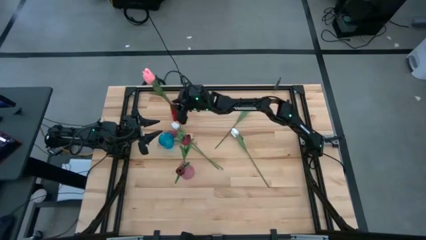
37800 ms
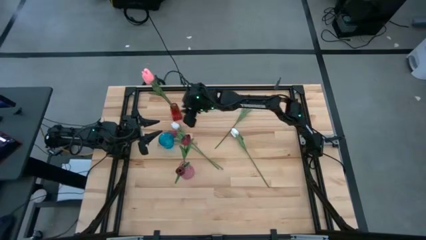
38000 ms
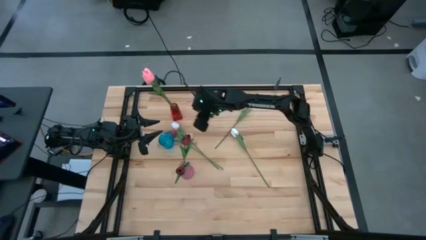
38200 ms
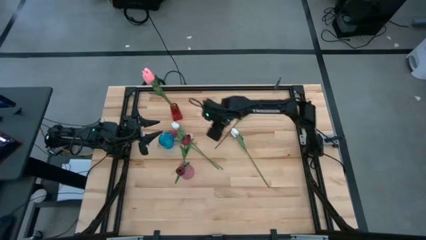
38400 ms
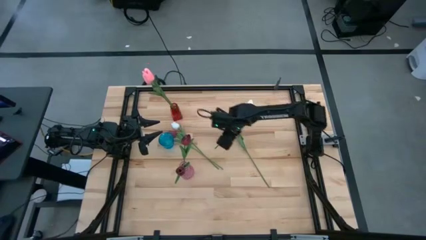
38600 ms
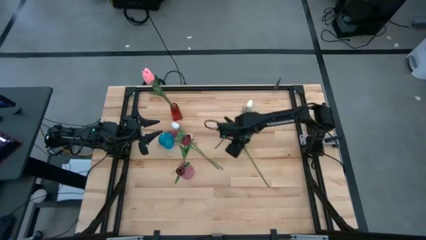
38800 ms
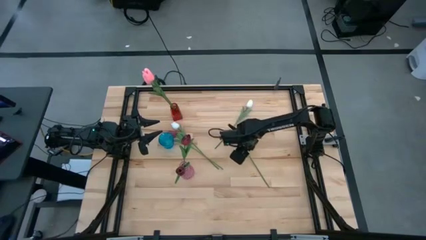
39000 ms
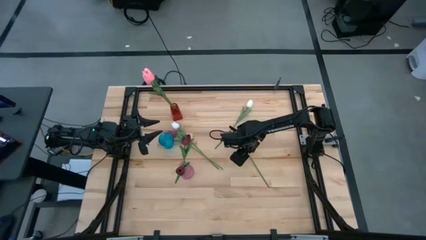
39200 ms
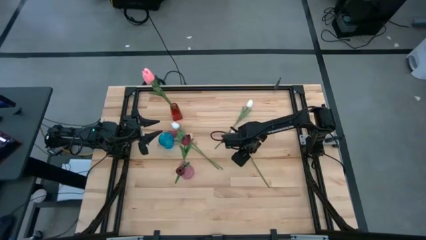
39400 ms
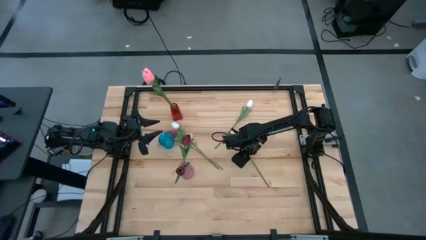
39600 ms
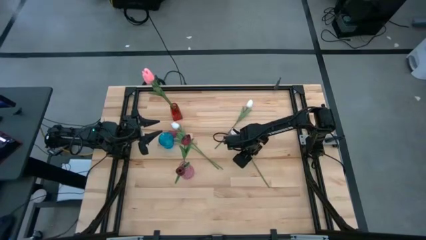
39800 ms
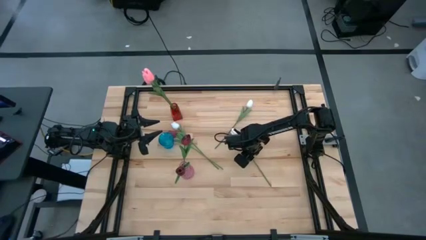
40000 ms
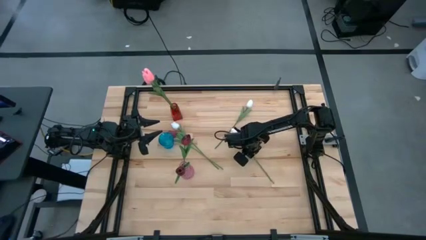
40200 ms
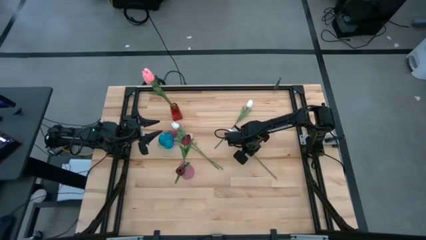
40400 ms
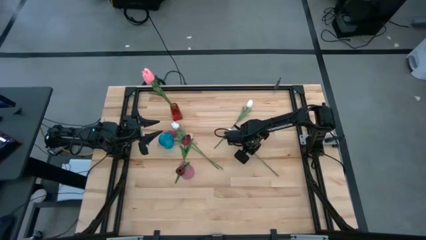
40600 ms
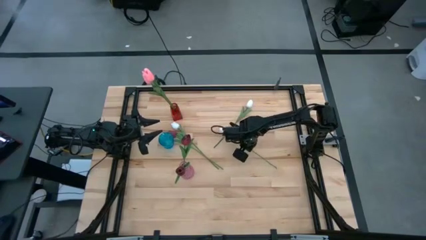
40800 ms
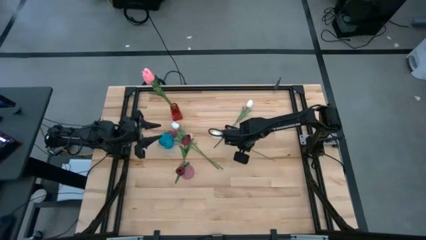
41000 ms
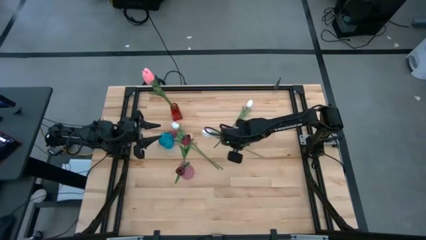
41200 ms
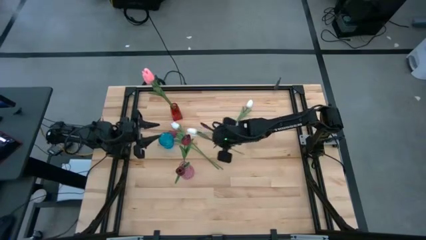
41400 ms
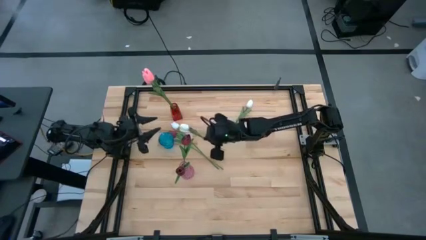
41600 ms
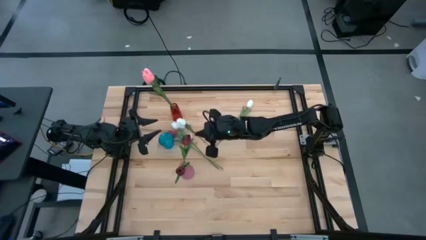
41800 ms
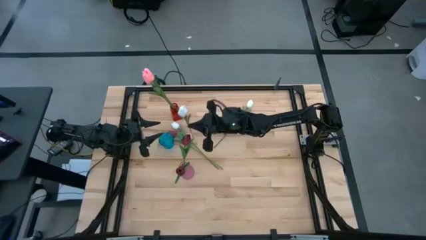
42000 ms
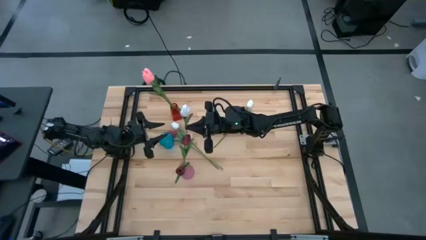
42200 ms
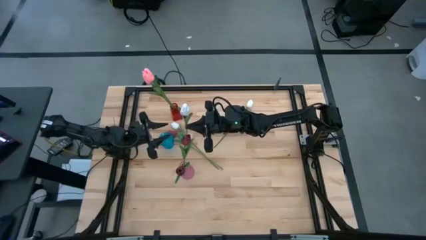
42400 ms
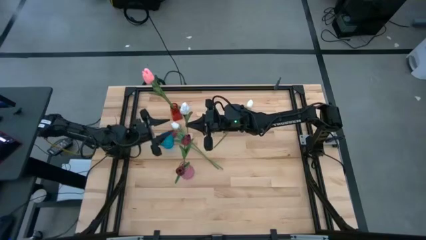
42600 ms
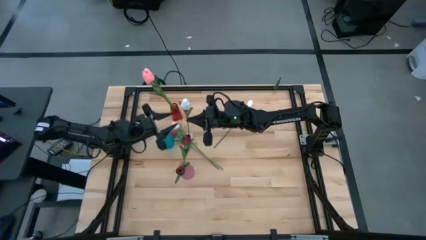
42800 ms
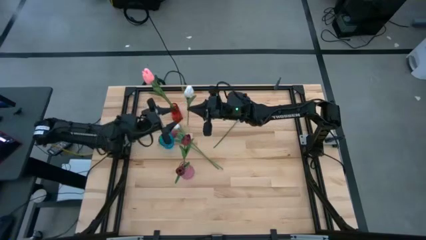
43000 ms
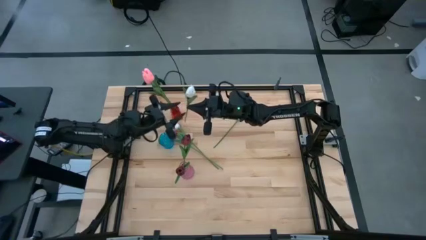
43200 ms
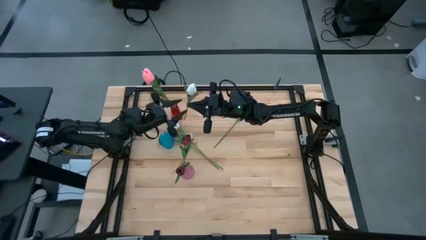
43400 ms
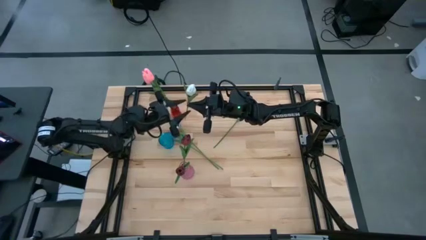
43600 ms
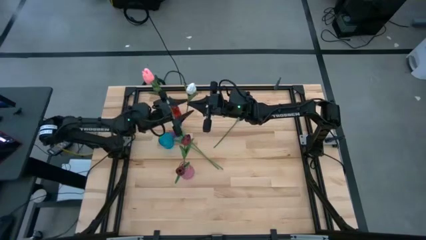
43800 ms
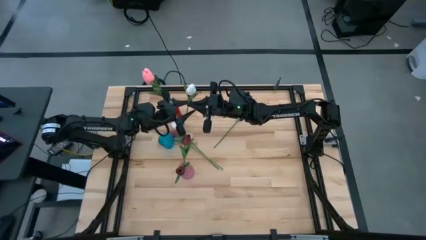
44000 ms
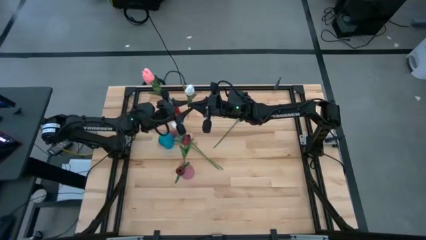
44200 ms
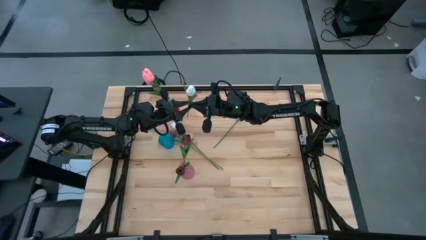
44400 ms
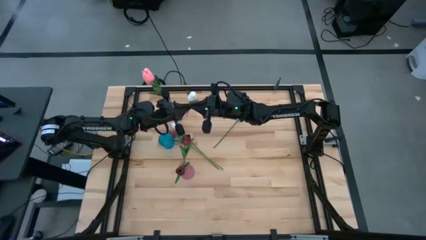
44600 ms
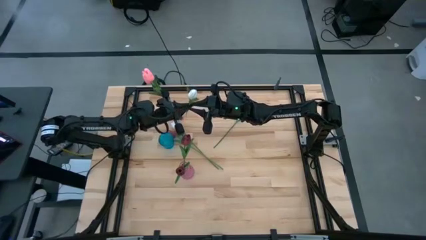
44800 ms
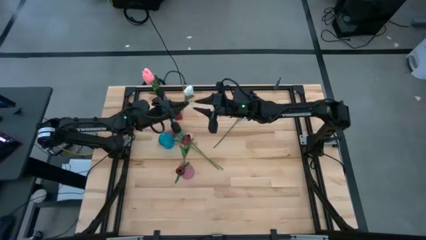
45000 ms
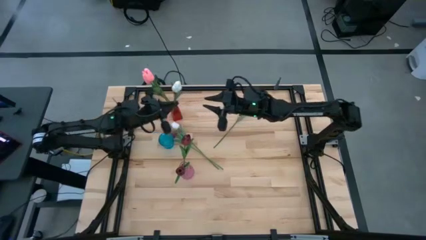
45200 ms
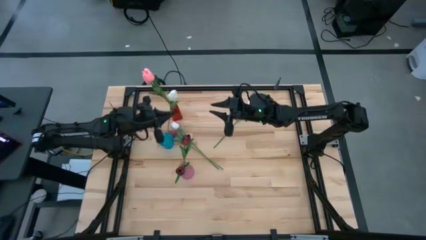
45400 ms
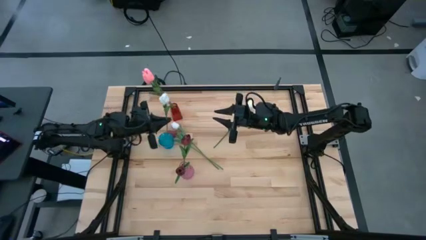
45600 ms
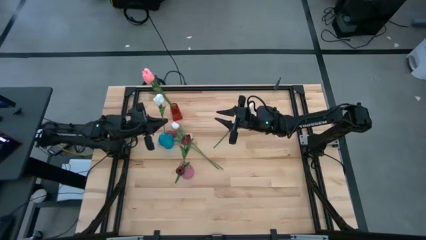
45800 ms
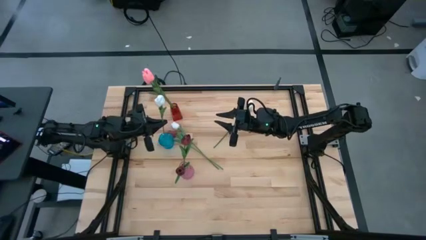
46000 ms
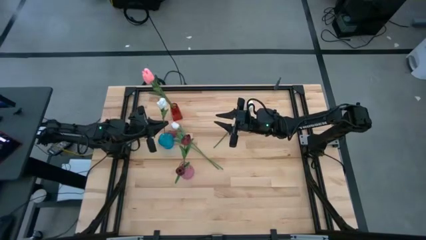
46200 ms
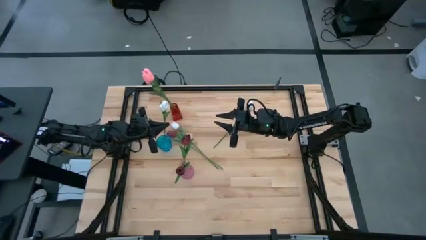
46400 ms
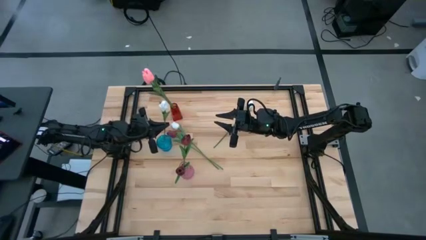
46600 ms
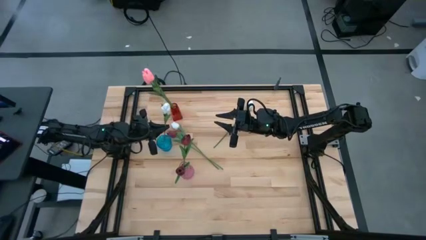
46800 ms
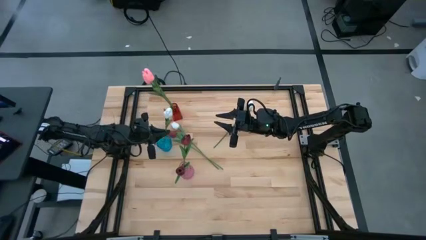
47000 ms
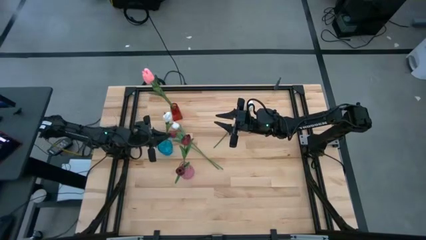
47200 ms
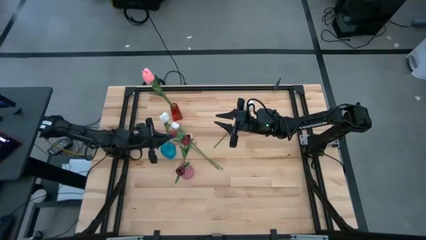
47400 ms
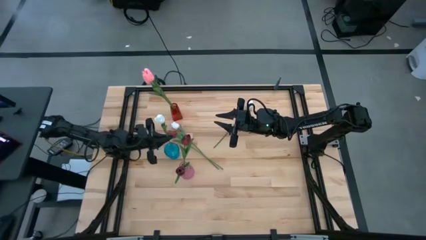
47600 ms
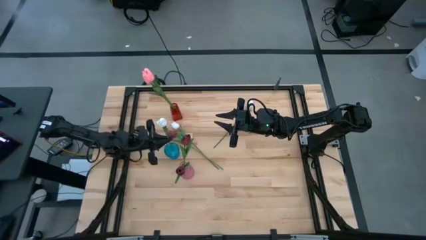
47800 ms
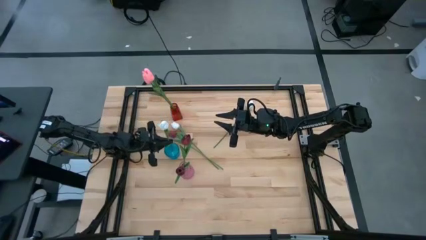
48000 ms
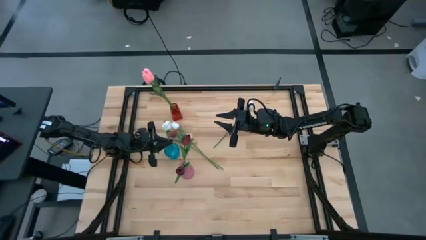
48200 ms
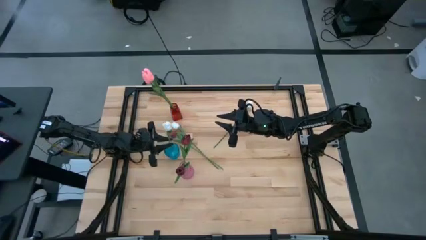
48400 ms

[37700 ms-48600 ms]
Task: Sort flowers into vase by color
Put the bottom right white tulip into the blue vase

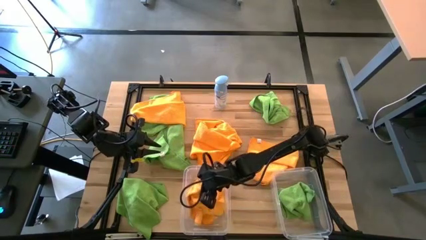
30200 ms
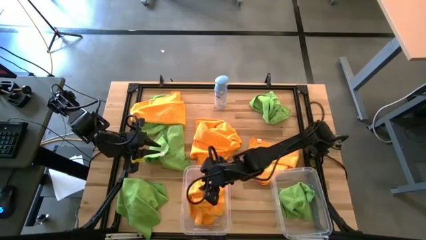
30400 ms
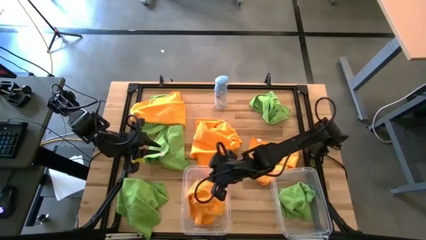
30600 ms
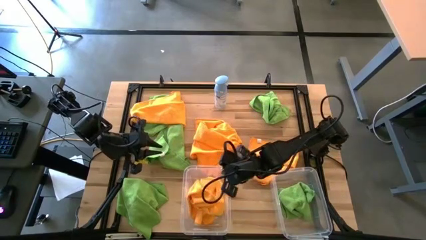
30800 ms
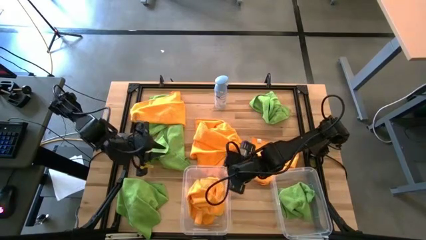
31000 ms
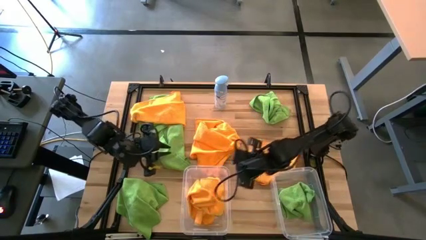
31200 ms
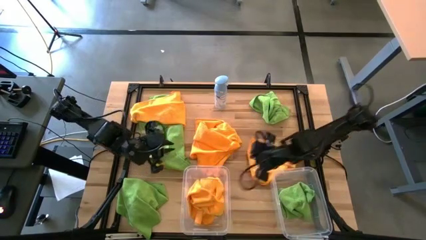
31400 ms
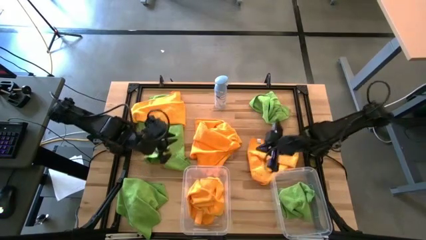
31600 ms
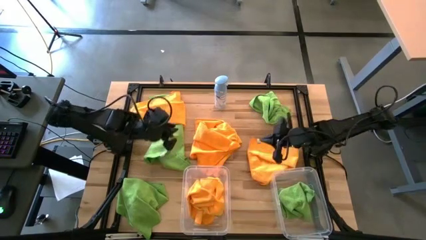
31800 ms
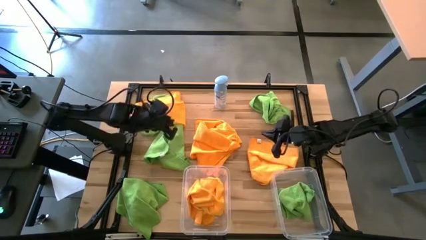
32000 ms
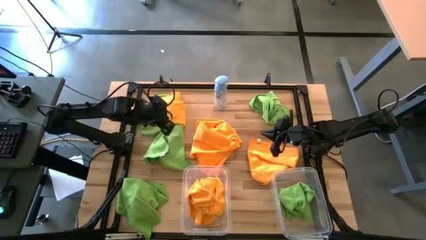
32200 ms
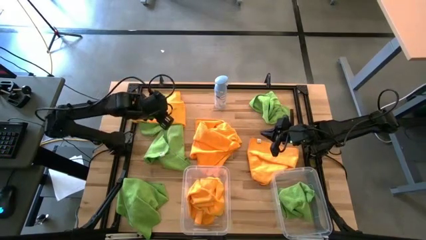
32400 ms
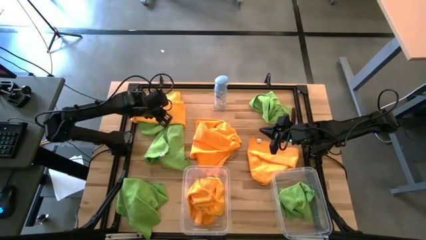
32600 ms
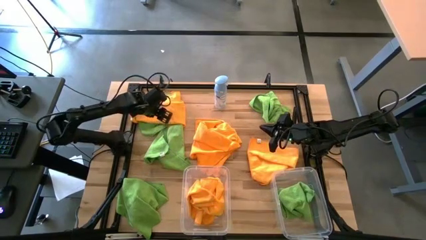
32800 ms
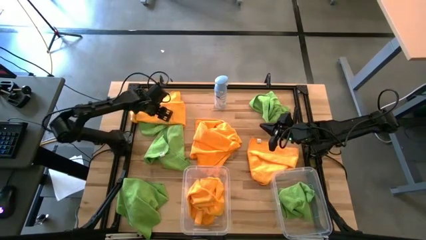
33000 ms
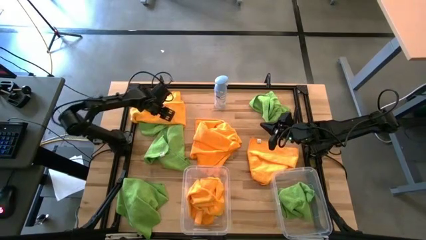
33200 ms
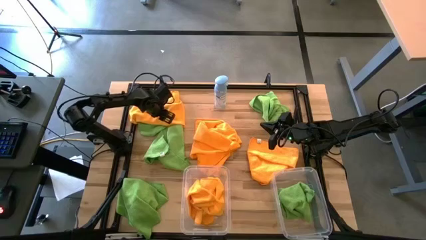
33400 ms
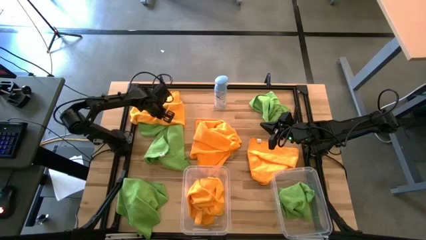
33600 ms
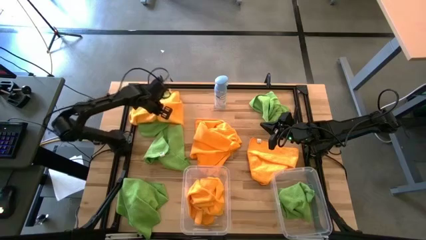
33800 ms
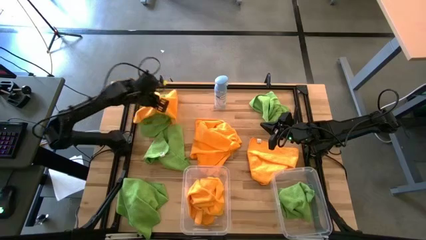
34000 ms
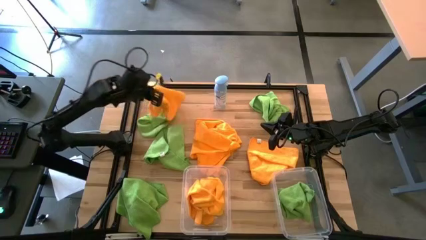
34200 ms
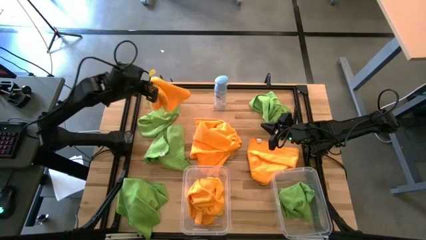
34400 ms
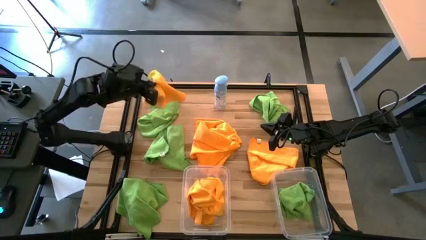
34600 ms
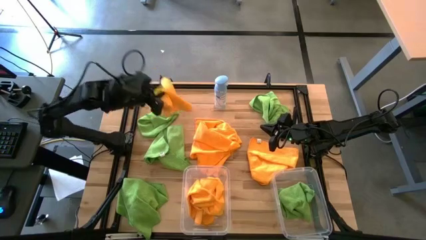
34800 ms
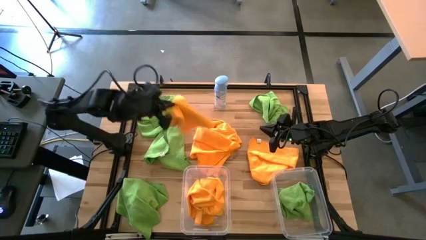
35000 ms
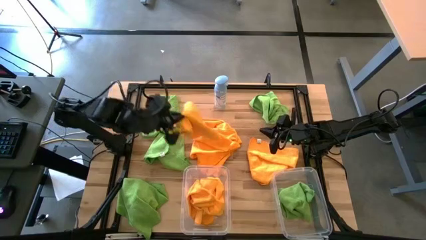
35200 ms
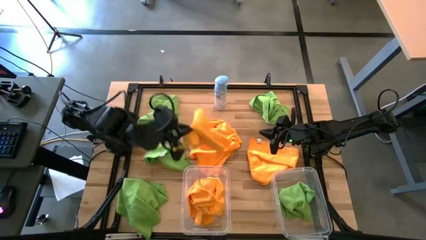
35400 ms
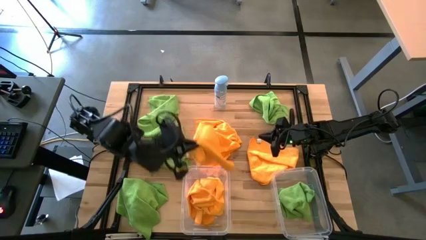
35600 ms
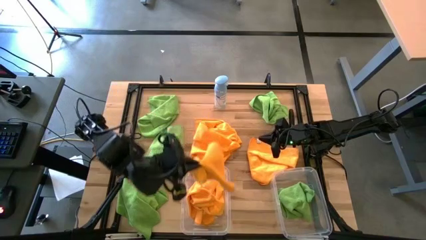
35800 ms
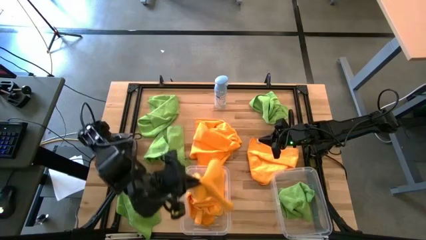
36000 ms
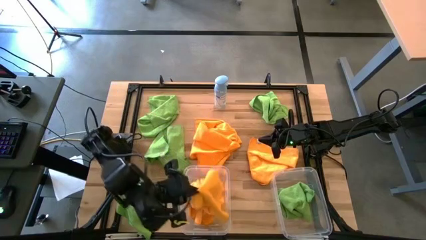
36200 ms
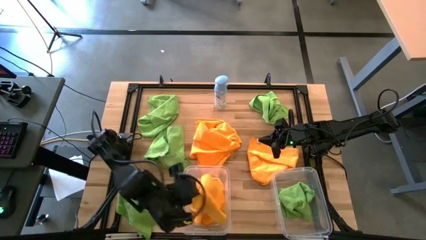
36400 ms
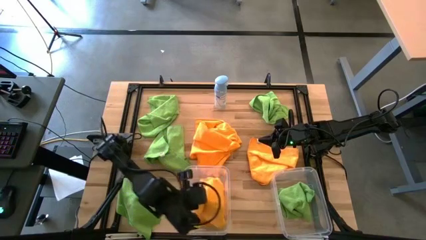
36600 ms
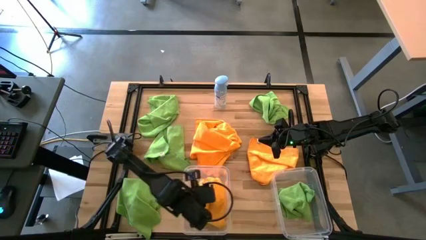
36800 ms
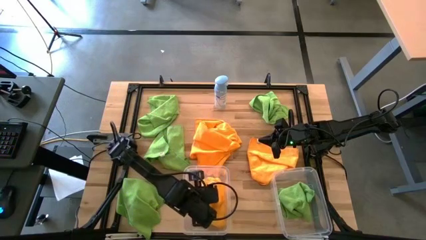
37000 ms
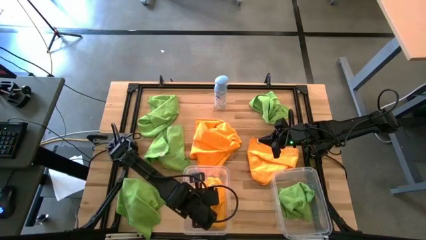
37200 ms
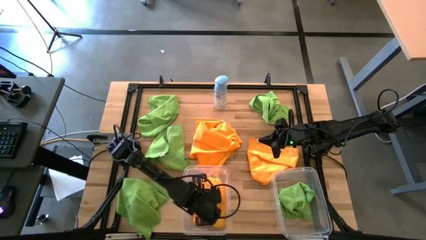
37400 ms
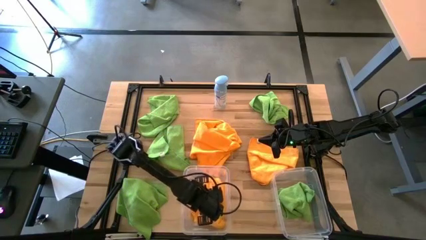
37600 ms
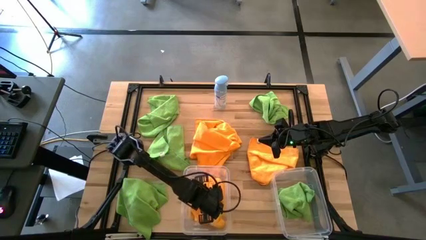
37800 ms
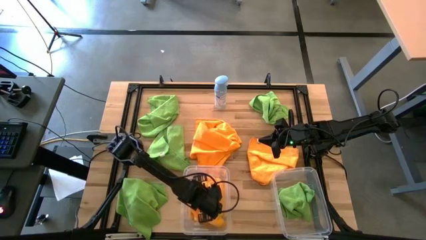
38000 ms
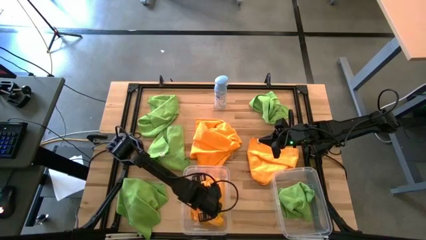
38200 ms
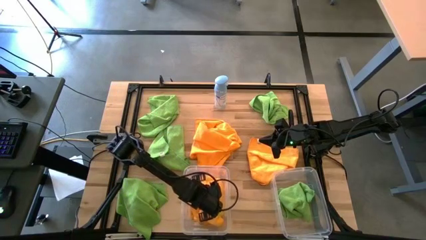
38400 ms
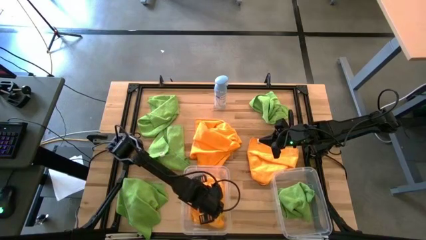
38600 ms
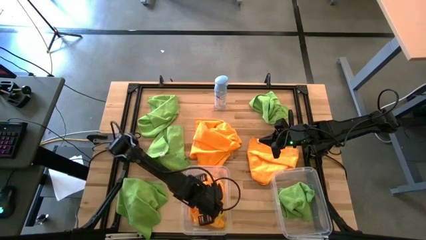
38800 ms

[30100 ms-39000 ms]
Task: Sort microfiber towel by color & place in baskets
Put the yellow towel into the left transparent bin
